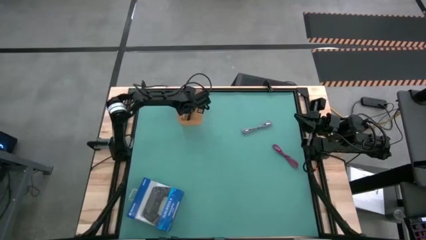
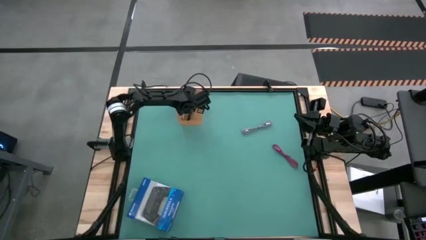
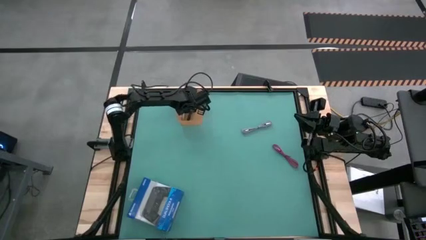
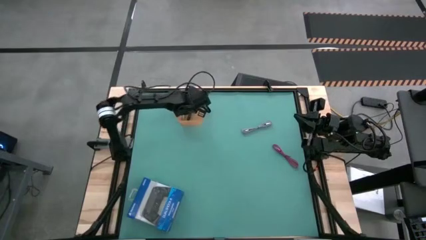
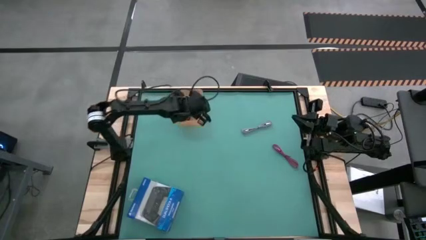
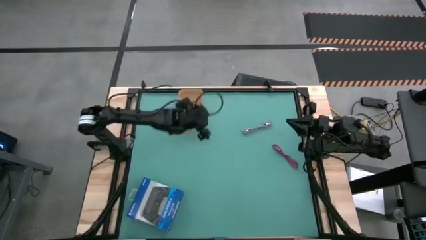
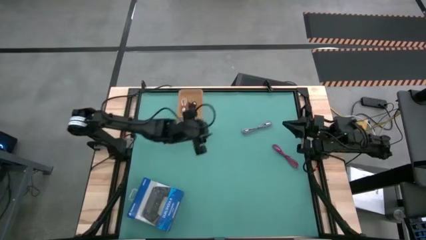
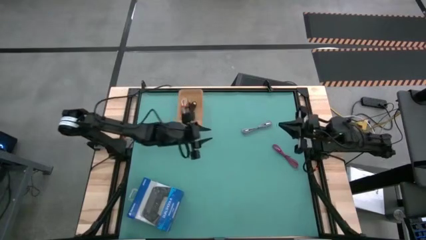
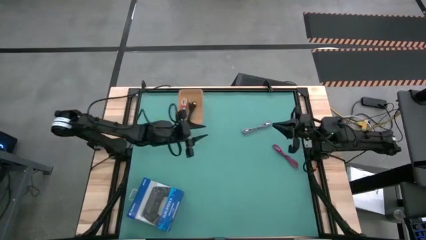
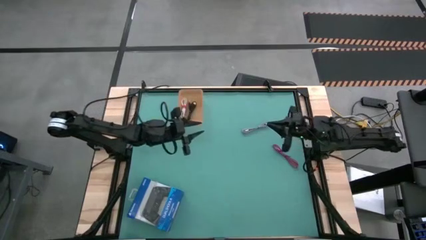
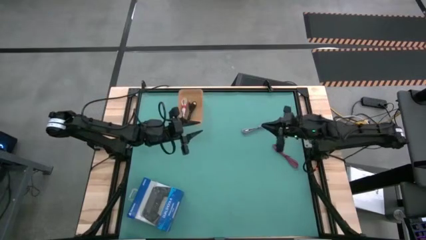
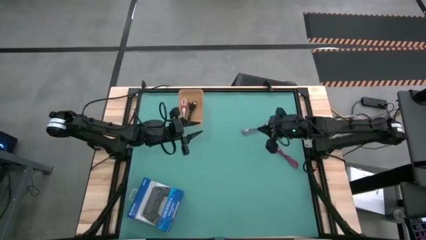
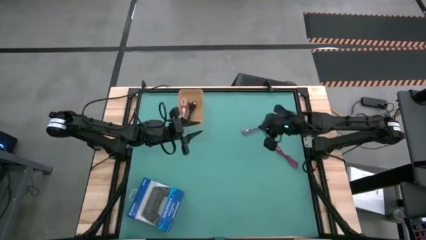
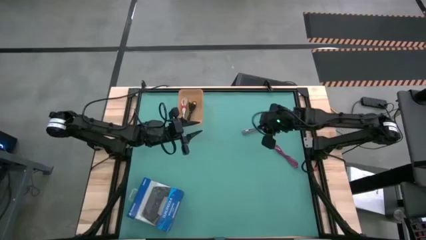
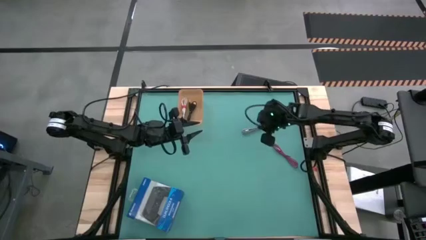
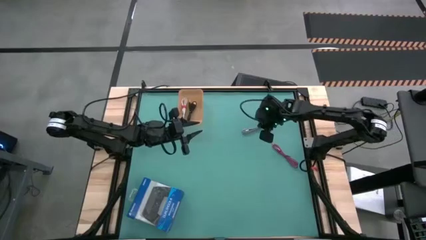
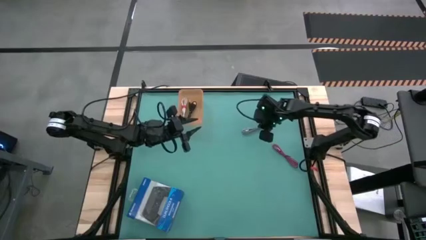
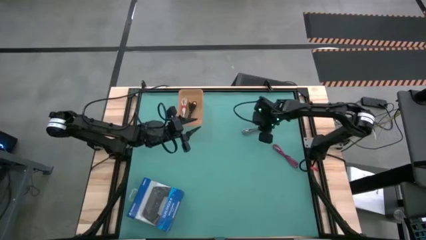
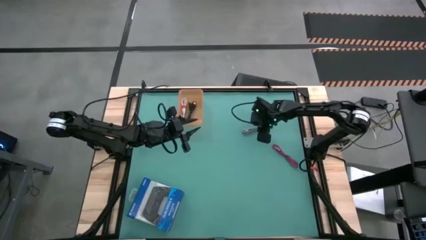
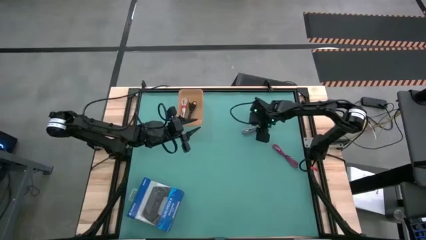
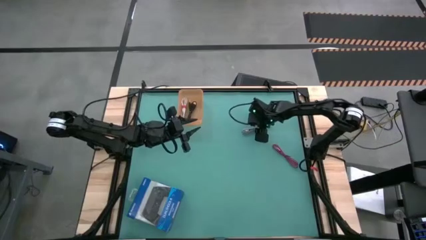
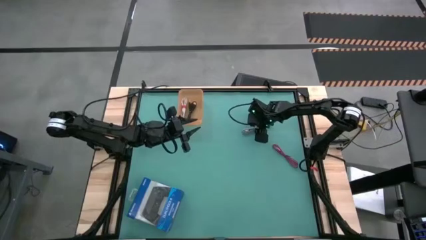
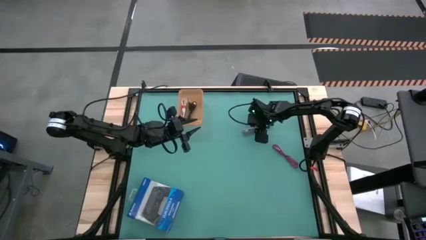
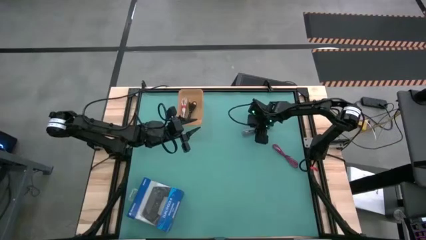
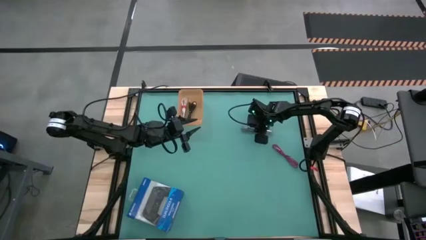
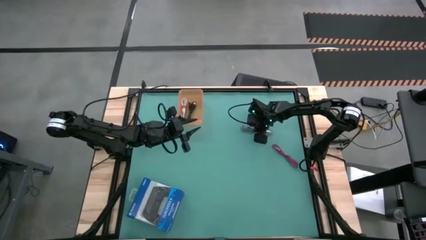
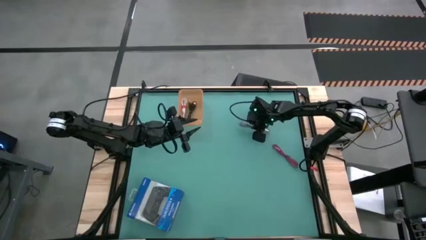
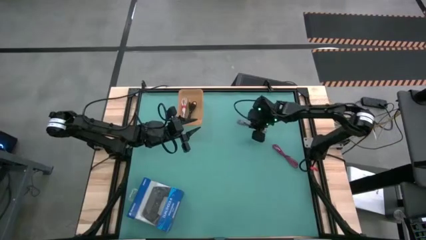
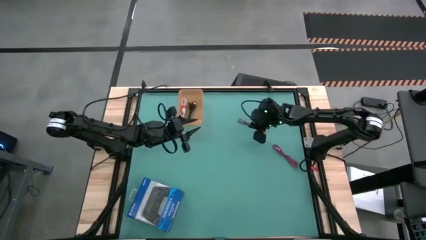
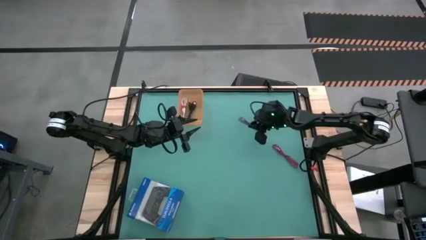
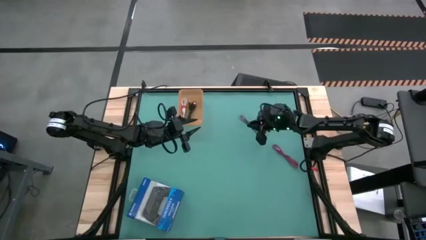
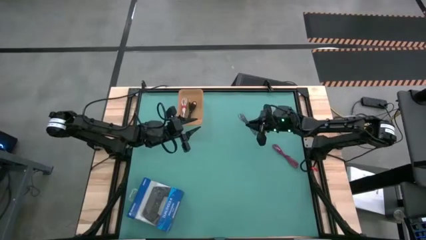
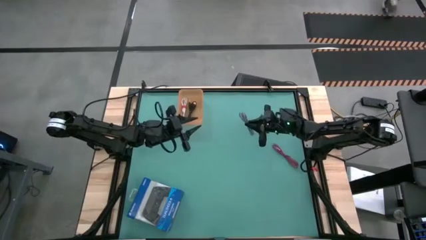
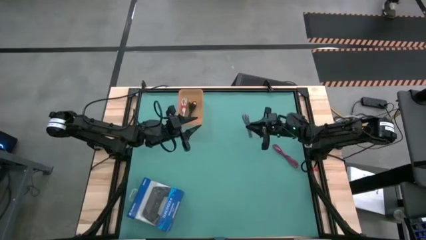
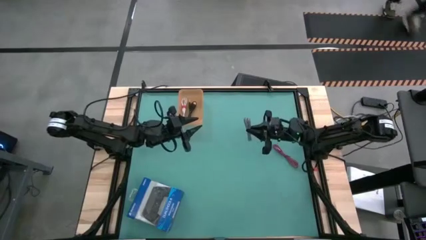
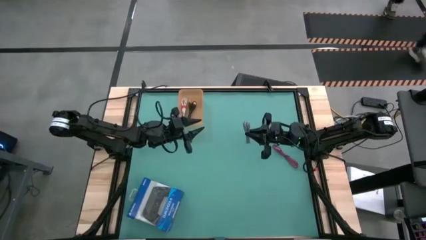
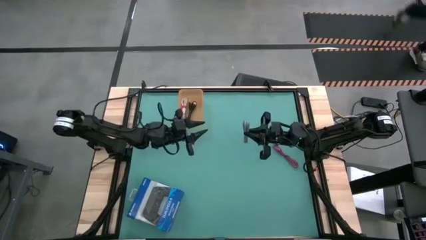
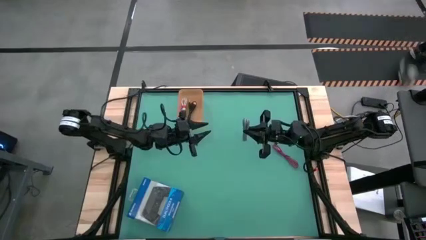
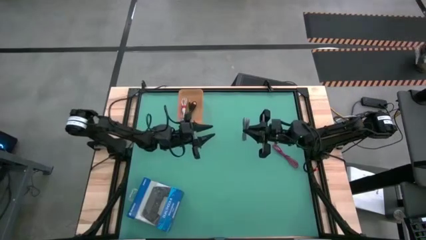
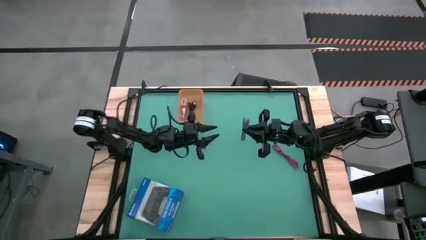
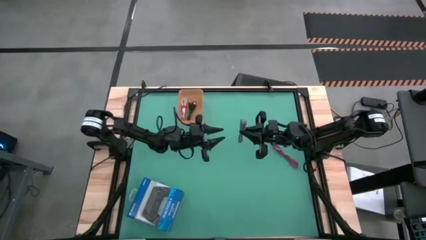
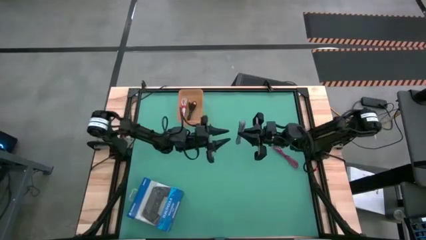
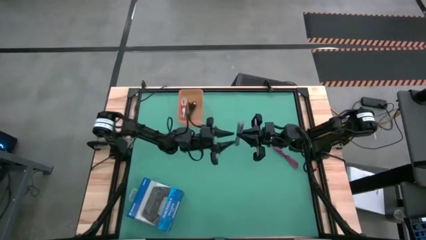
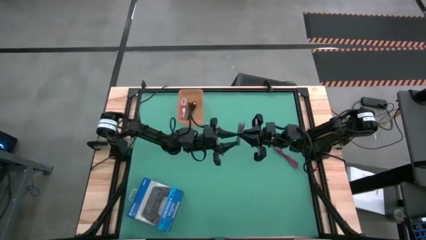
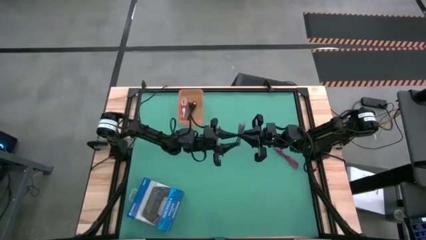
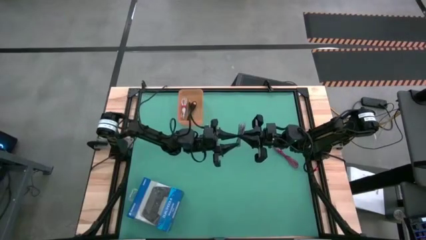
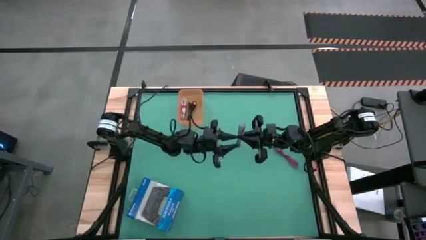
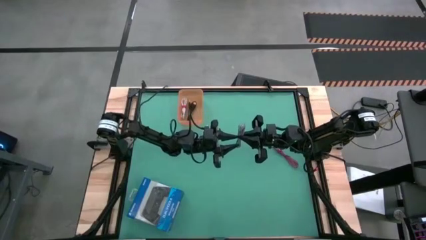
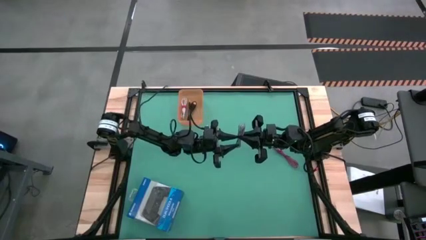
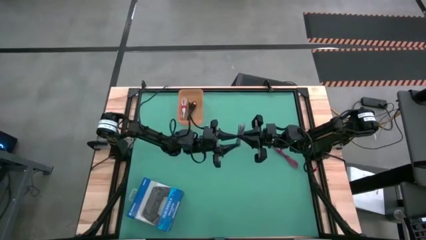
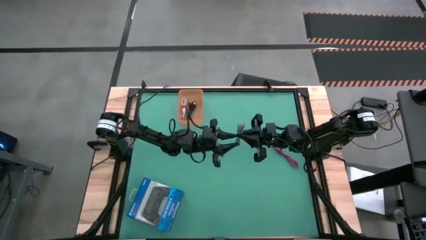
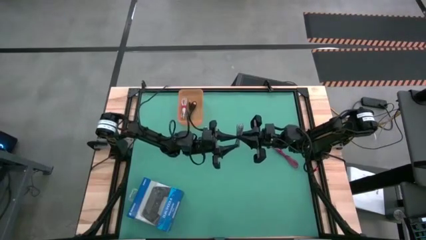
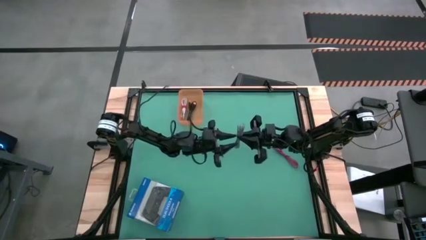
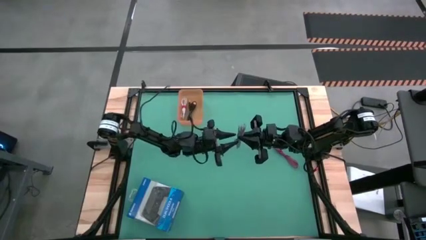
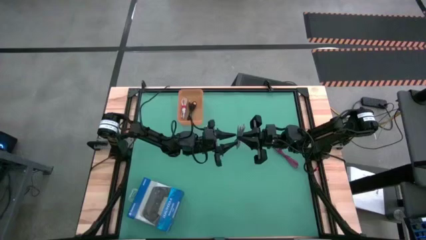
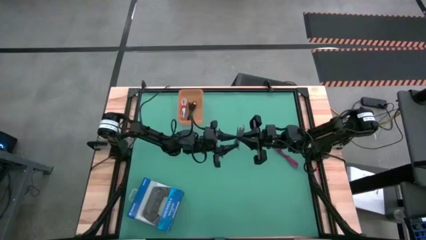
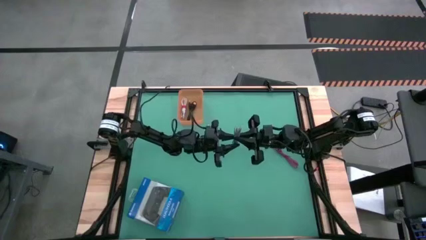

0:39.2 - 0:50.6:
Task: Pick and place USB-C Cables
Put the black and white charger cable into the orange bin

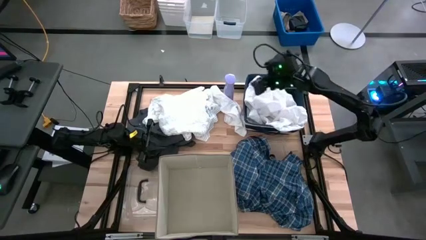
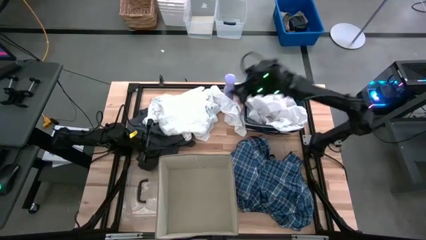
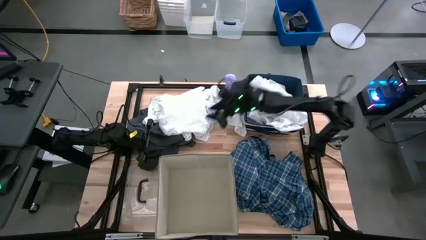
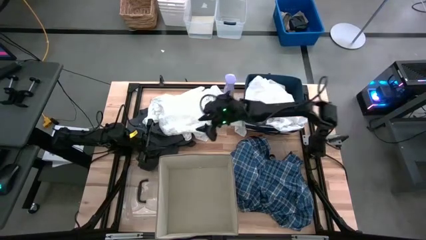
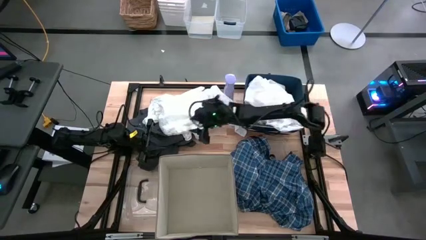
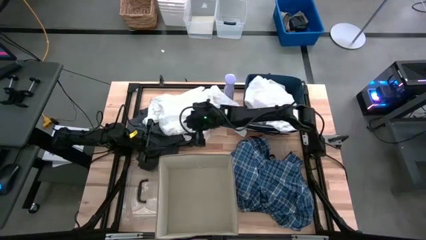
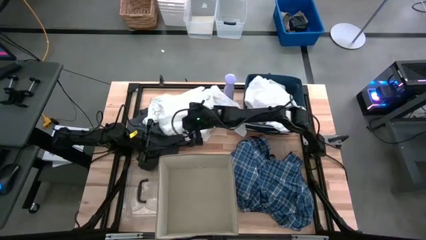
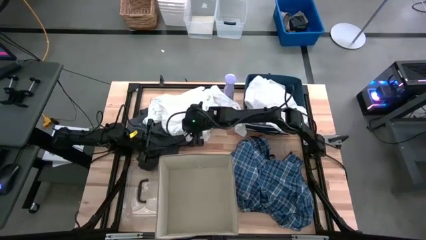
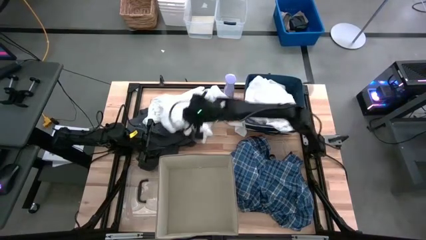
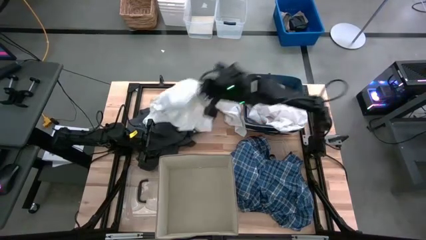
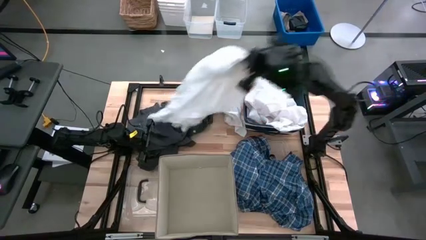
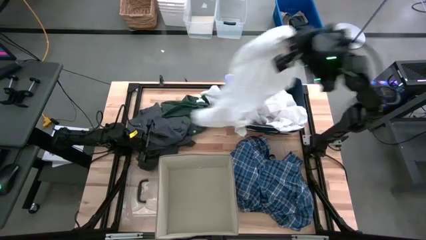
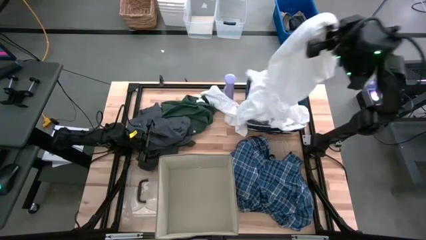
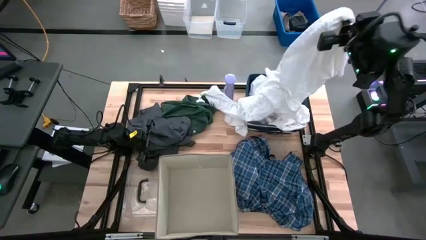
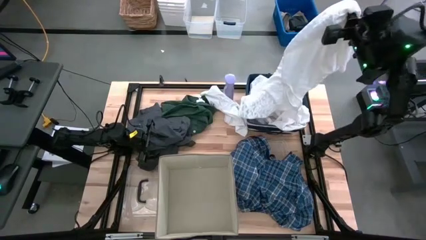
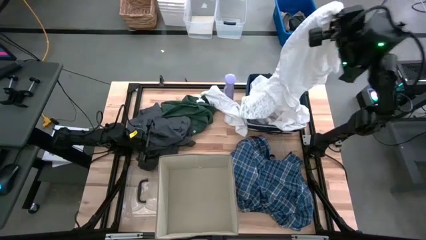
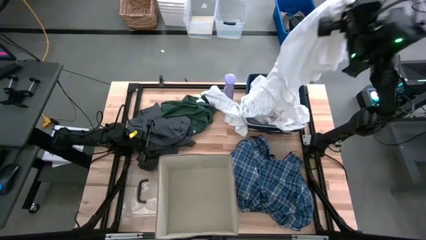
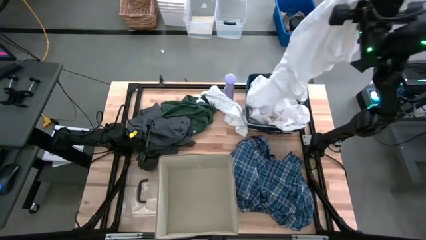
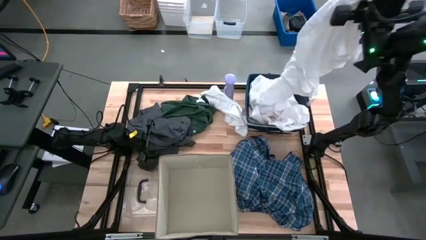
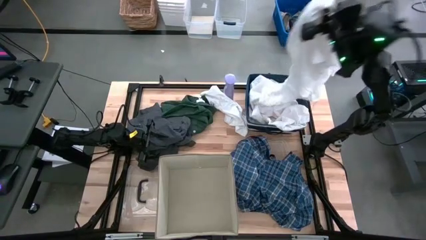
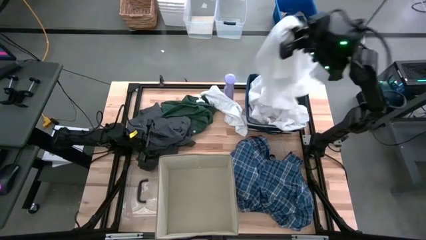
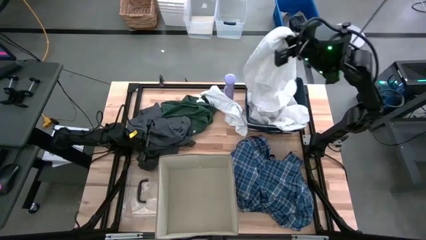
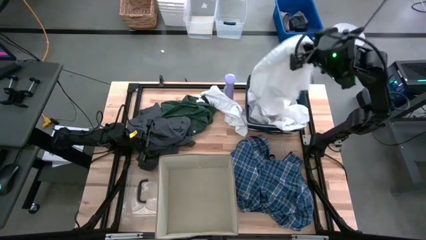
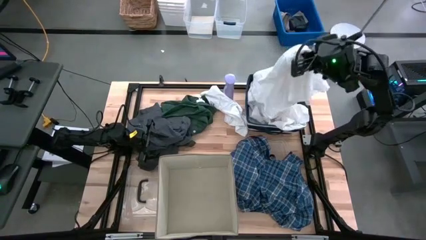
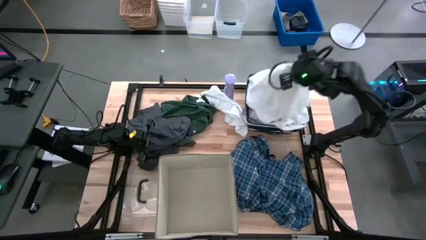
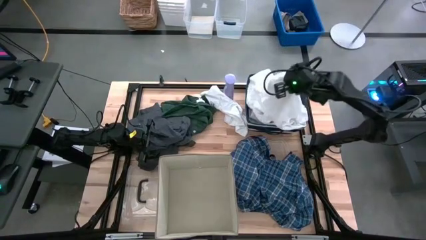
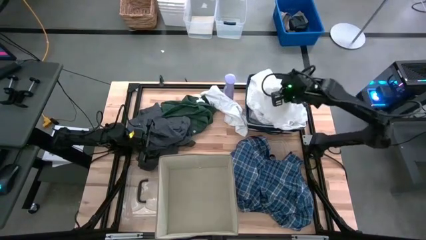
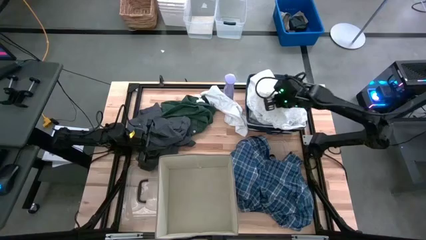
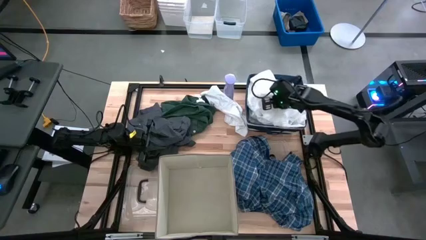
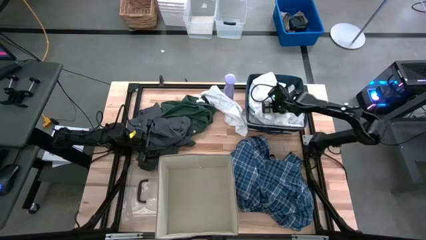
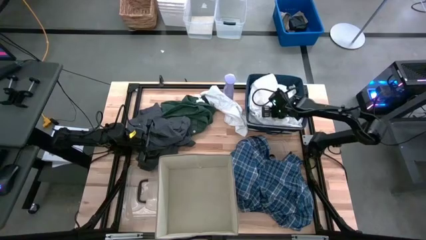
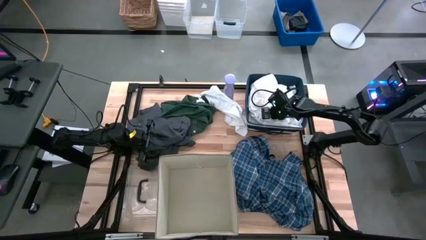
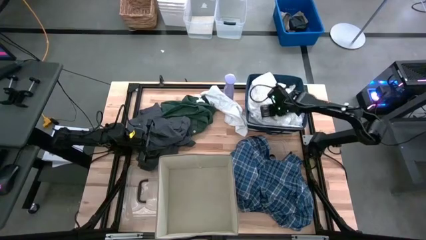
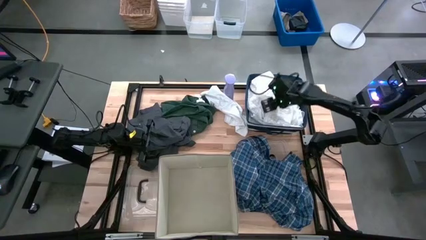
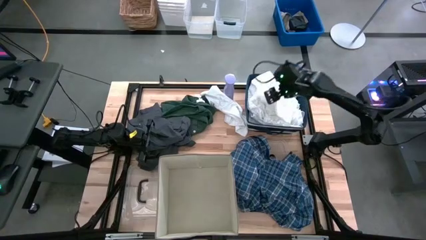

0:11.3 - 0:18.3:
Task: Sort clothes
Put the white shirt into the blue bin
